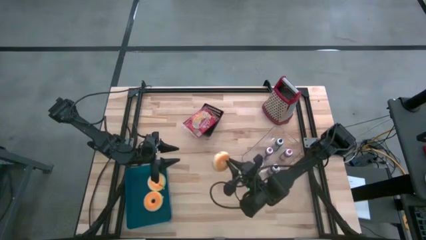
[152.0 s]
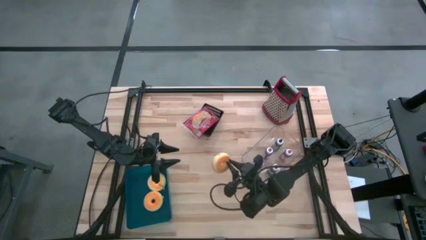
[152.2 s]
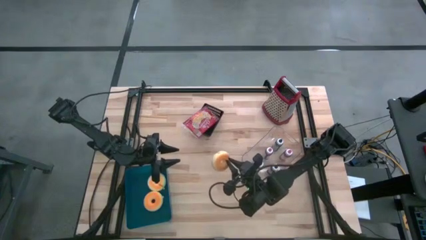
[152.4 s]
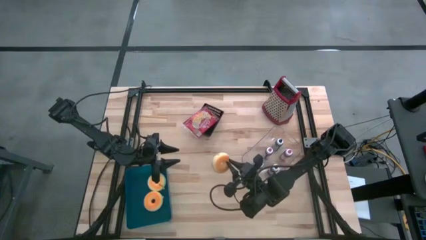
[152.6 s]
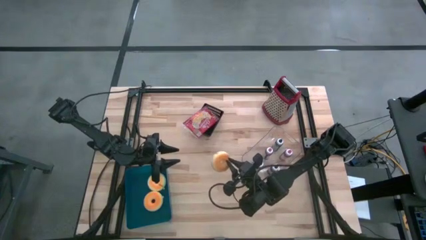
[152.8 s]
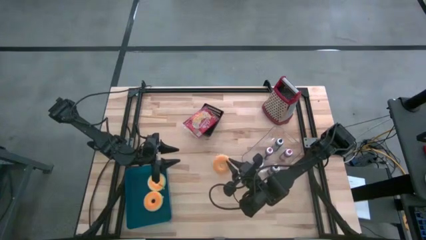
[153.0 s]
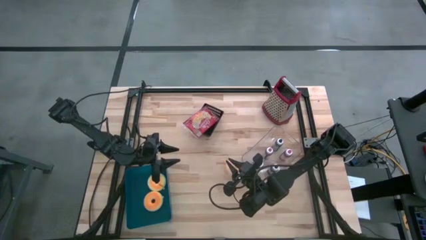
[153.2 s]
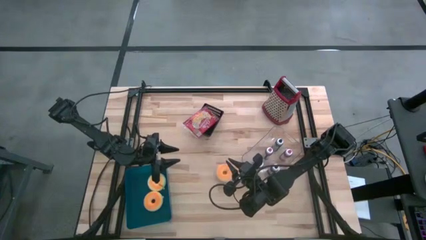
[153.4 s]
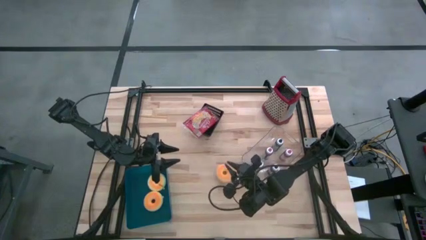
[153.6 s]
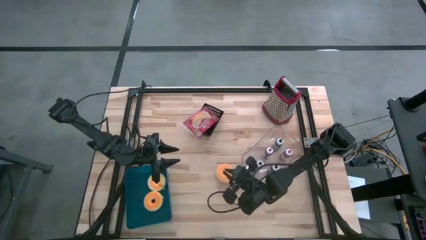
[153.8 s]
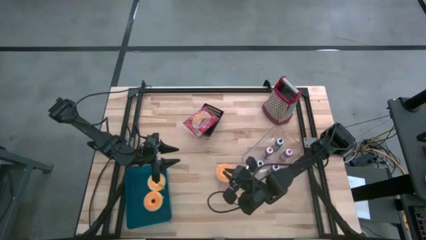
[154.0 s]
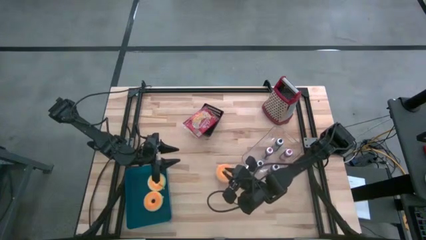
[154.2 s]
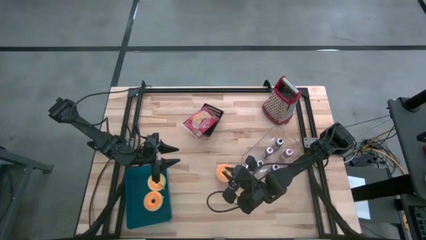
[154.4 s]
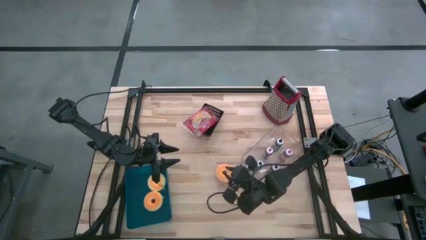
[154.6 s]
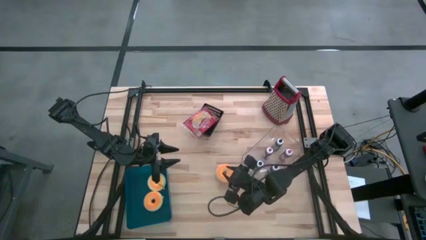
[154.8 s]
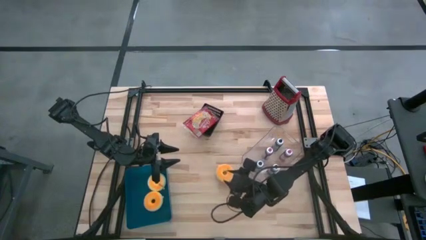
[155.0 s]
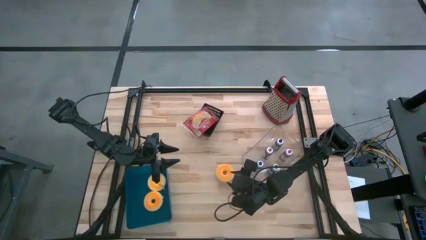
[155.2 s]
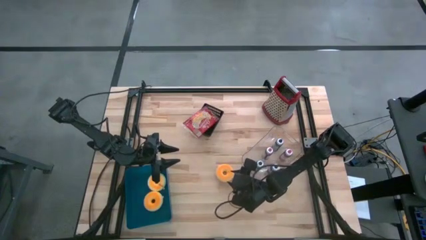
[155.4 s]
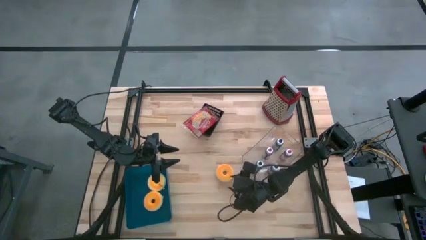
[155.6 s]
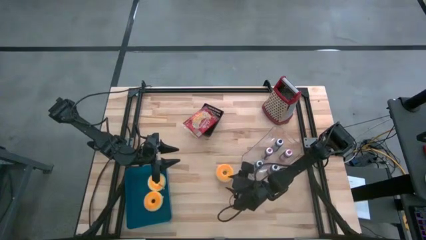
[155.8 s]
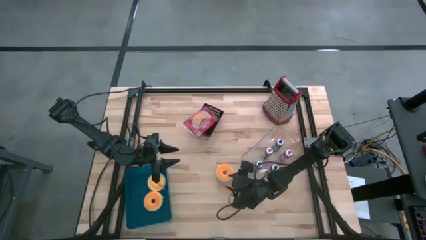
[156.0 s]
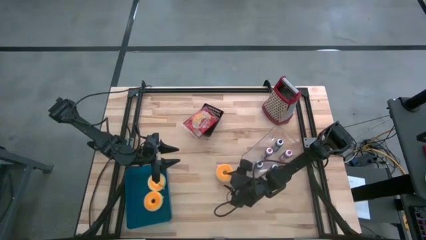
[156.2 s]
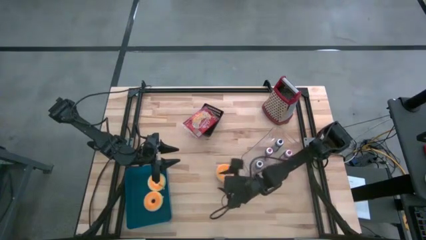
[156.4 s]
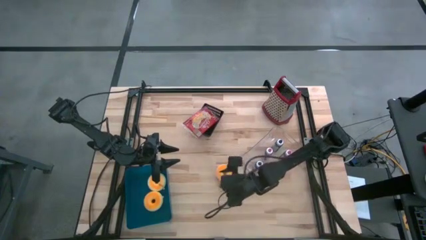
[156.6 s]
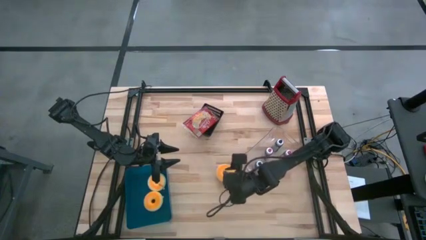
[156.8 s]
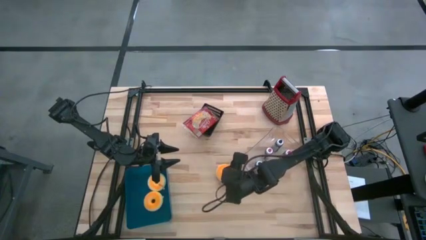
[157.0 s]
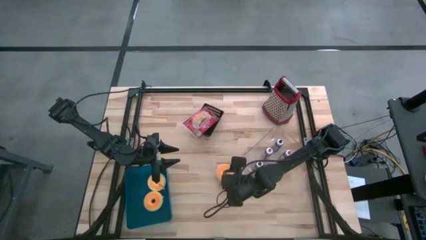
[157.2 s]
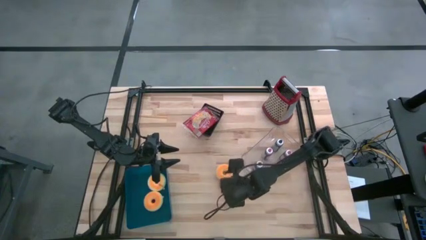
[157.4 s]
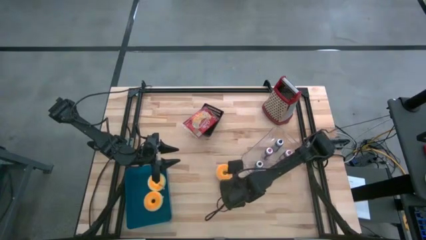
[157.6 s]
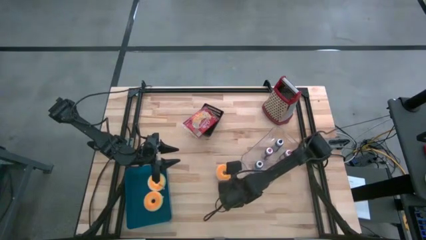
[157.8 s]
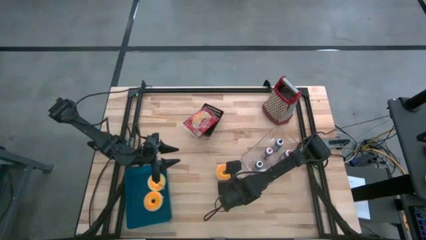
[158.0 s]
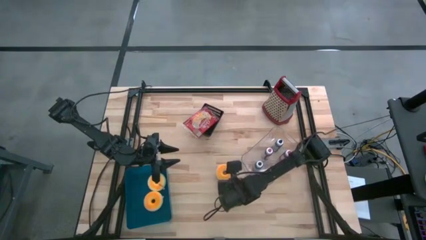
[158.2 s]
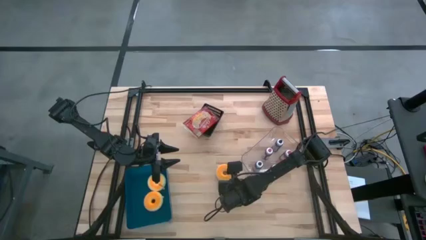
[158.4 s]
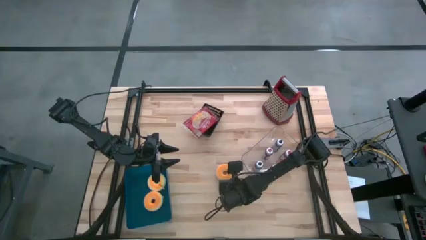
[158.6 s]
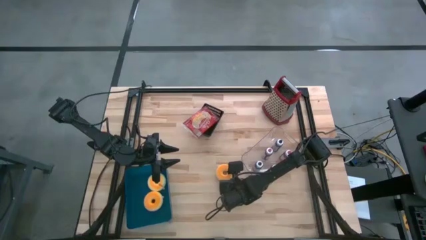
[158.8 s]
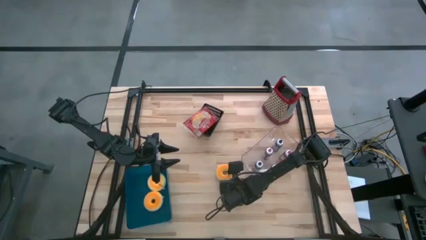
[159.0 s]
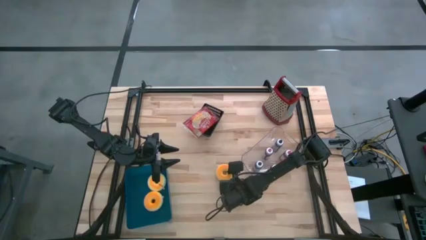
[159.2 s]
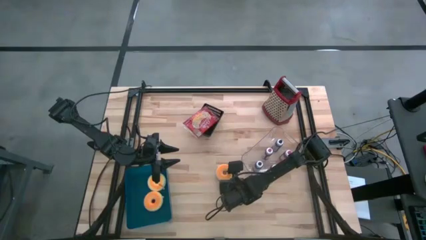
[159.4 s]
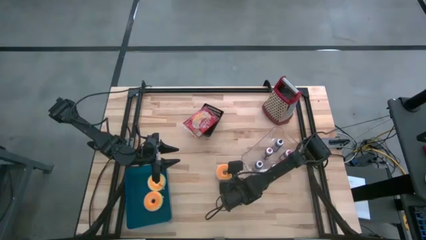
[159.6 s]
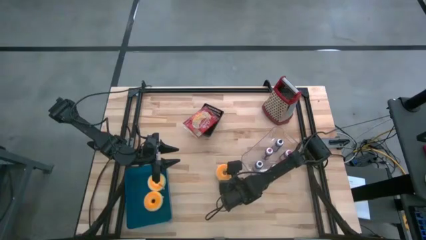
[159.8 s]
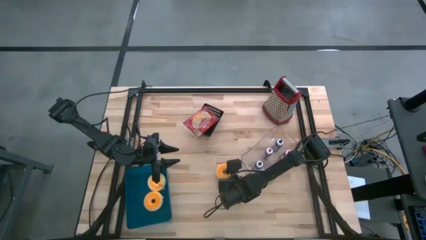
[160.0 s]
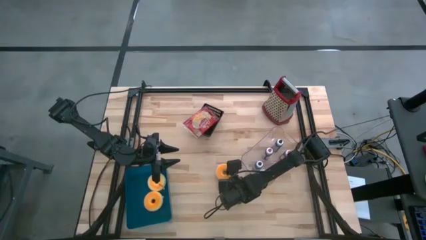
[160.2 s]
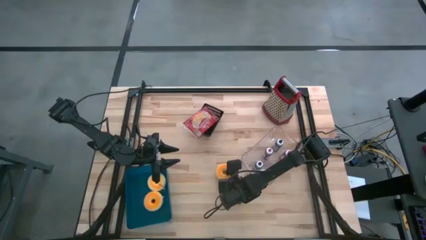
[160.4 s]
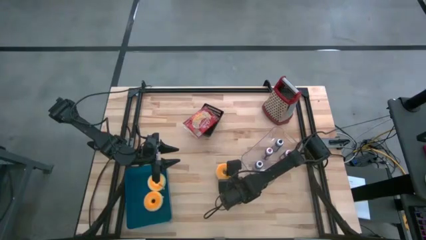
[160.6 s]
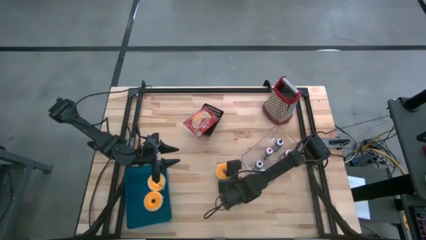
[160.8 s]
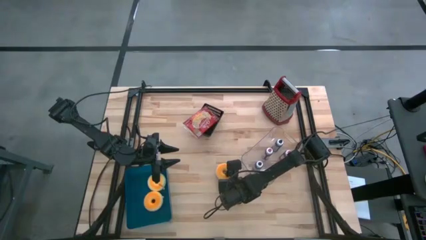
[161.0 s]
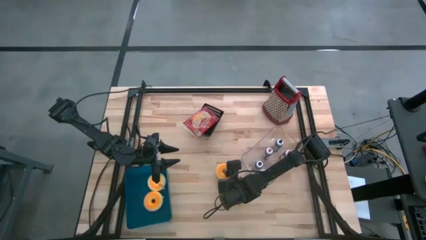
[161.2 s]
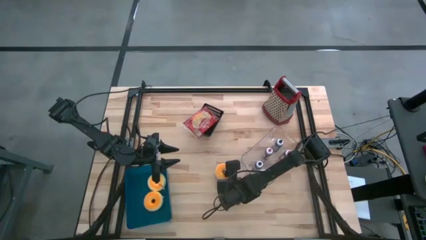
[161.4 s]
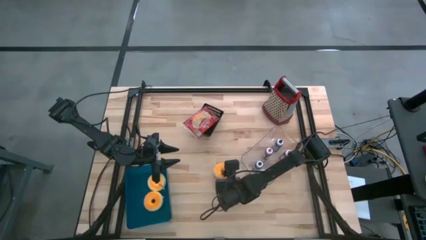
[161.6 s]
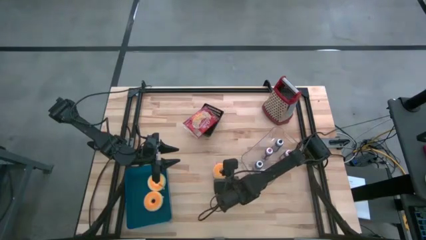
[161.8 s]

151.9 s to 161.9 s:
Task: Pick & Place Food Item
Put the yellow donut into the blue bin

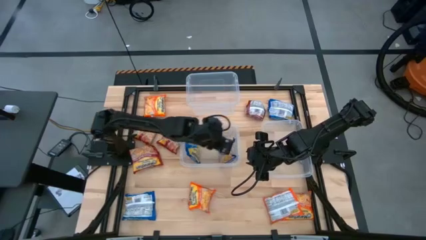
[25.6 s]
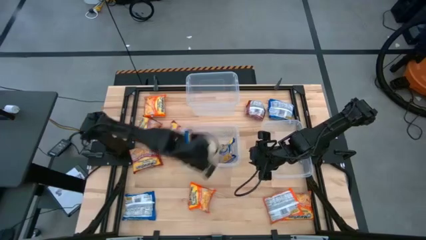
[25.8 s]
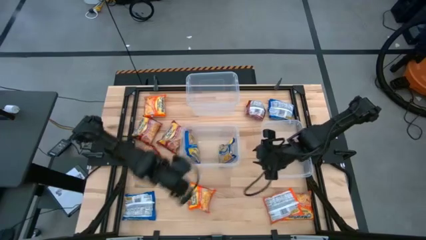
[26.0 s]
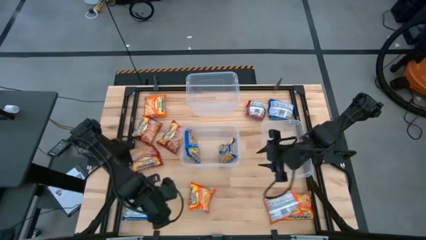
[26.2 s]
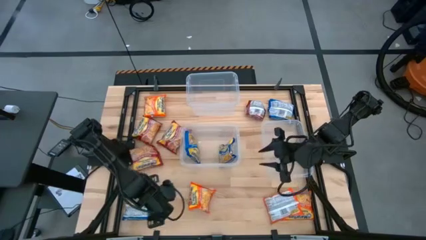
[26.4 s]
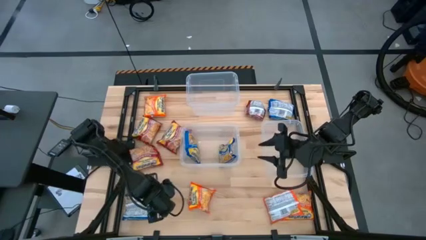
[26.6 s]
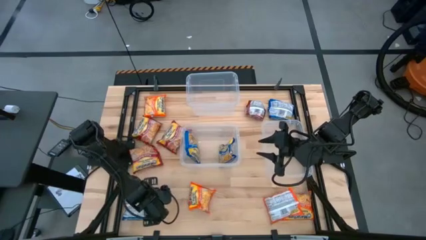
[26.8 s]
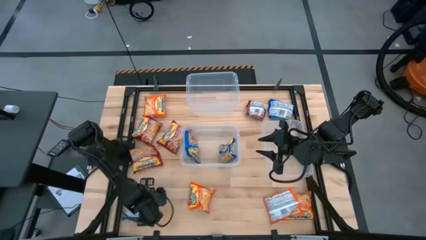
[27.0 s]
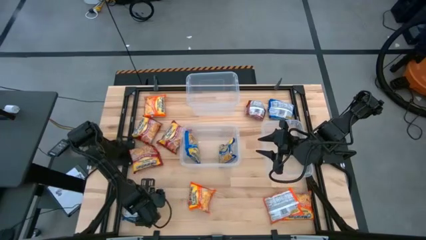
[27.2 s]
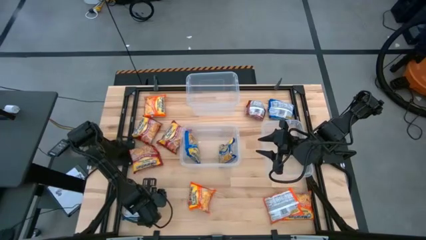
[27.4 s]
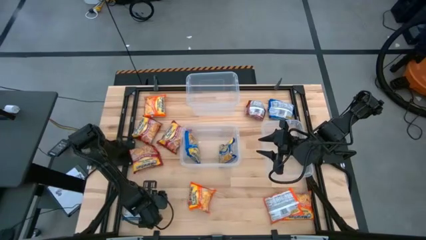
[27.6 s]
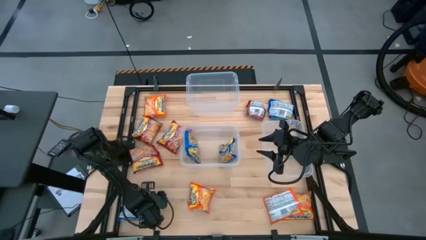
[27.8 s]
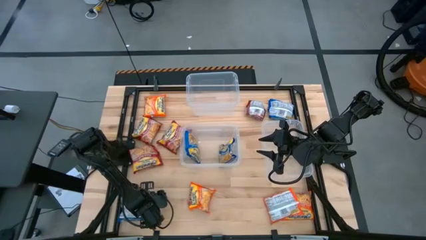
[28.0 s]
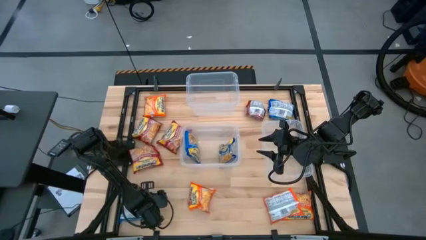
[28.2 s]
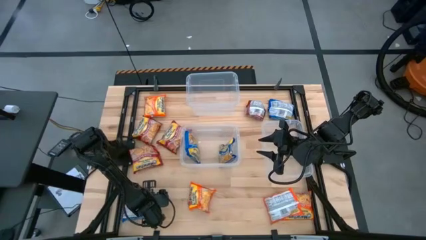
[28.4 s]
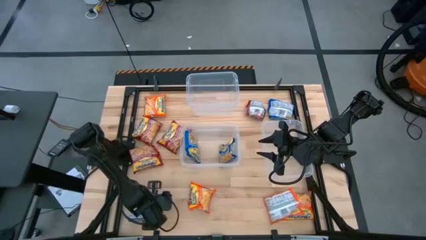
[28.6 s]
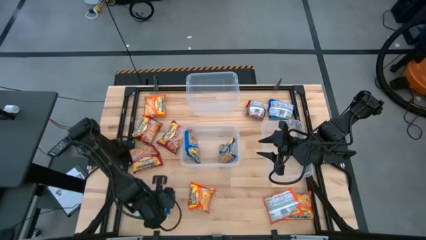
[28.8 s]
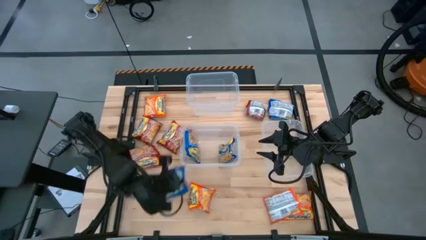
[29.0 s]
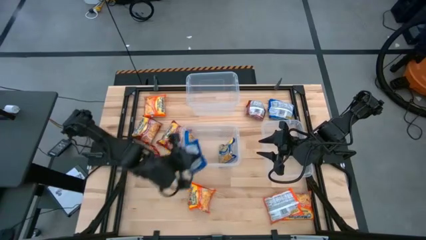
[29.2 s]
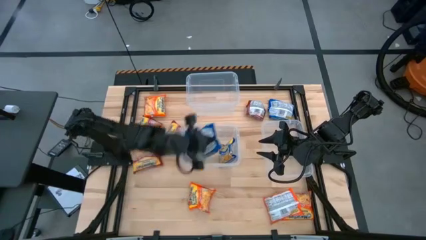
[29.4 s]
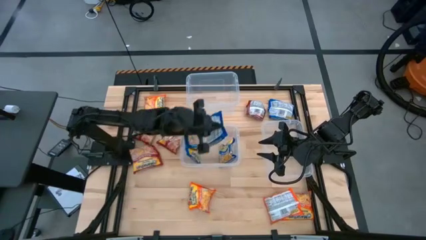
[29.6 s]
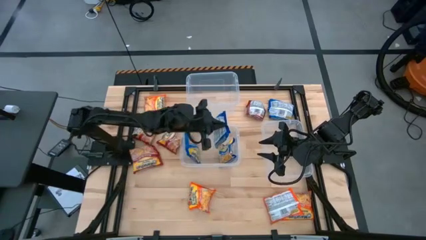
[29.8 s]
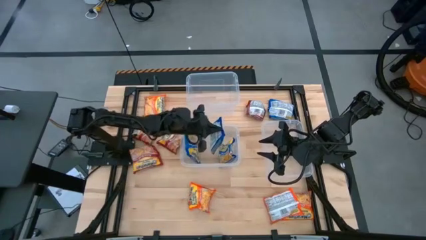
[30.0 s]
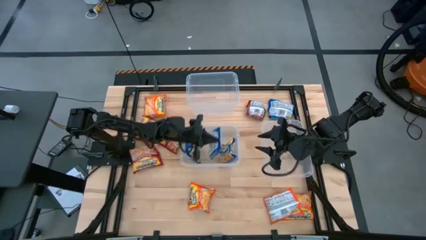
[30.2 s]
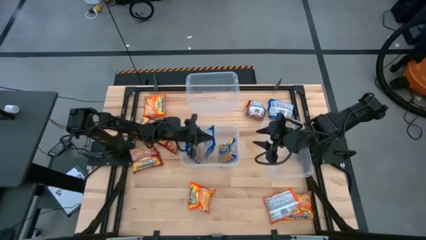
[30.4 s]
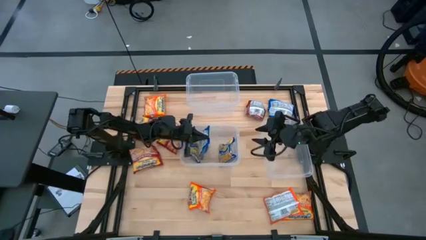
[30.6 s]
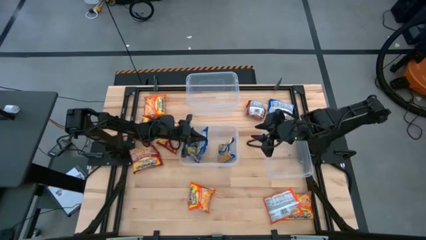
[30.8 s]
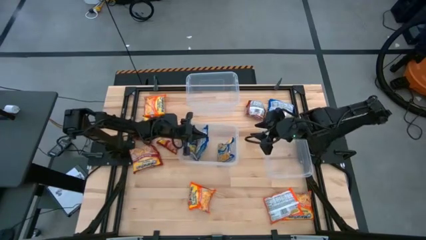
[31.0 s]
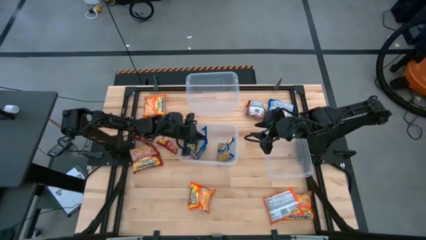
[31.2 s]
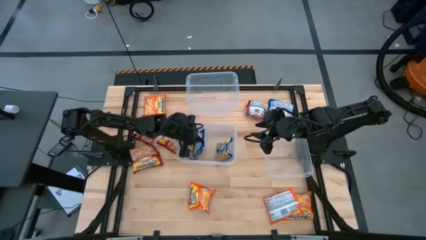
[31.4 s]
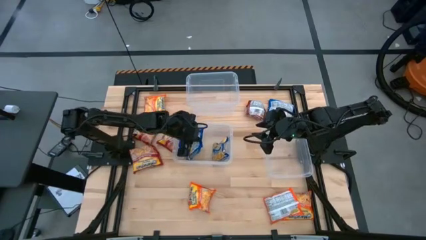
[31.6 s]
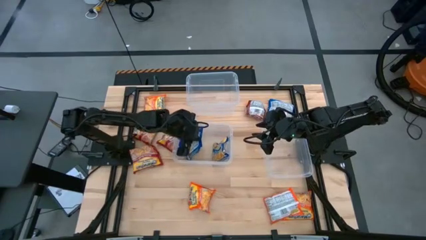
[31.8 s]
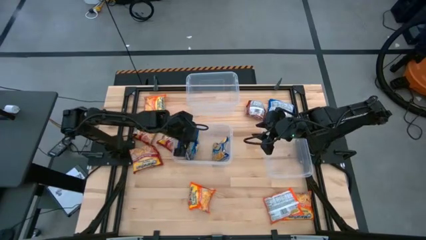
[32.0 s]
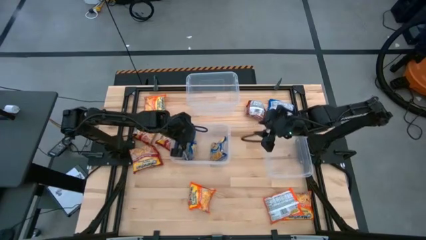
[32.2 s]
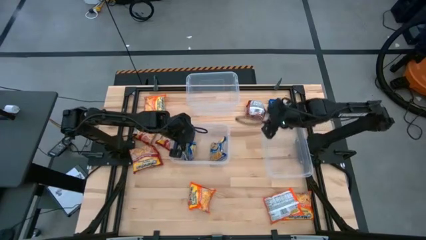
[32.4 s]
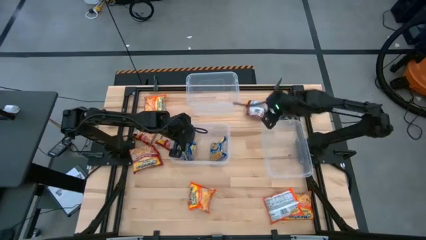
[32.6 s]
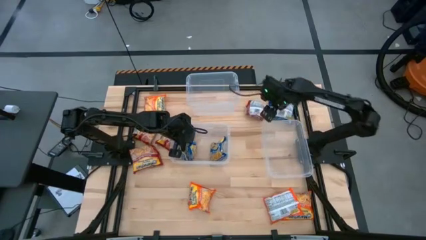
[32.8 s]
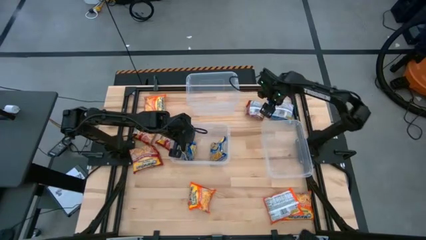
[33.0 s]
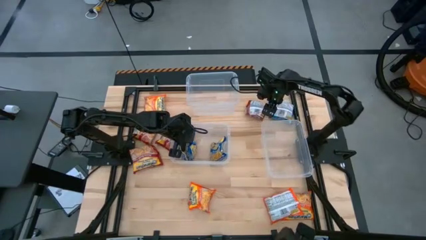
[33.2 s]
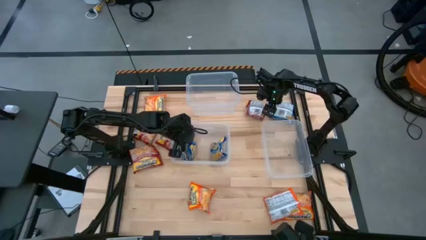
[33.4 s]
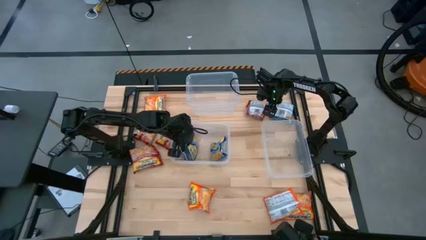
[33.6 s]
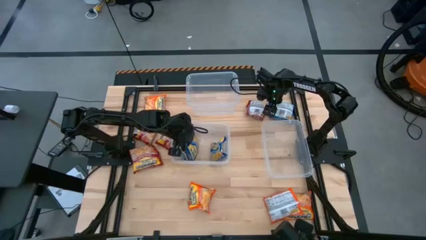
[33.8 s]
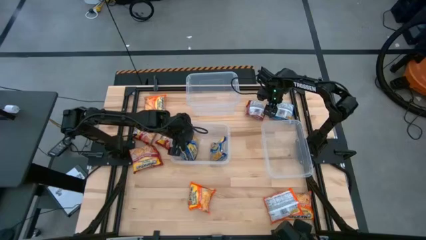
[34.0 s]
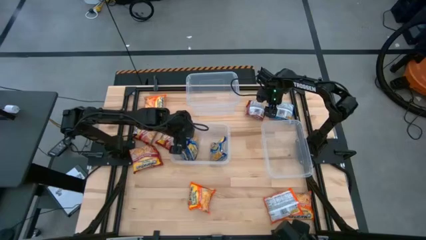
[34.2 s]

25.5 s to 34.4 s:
Task: Sort Maruchan noodles
Put the blue noodle pack into the bottom left transparent bin
